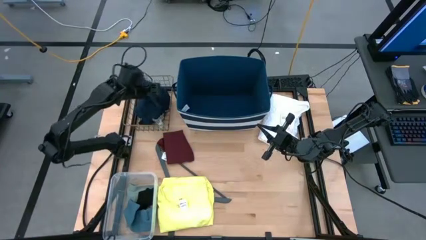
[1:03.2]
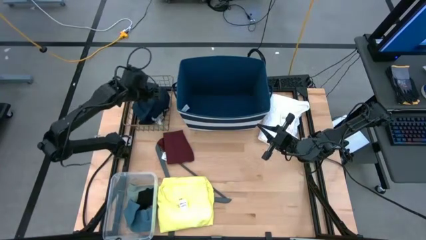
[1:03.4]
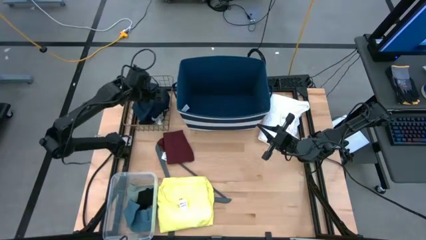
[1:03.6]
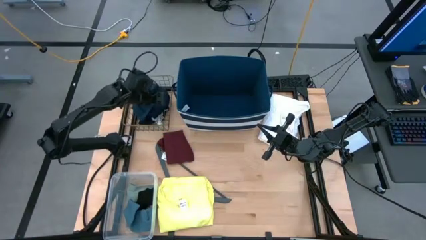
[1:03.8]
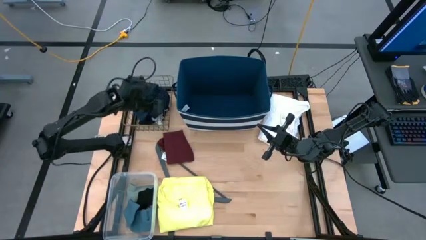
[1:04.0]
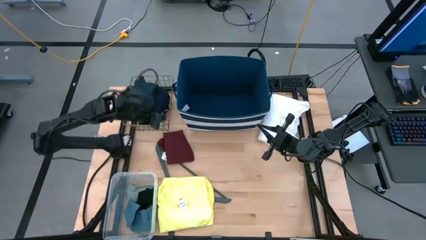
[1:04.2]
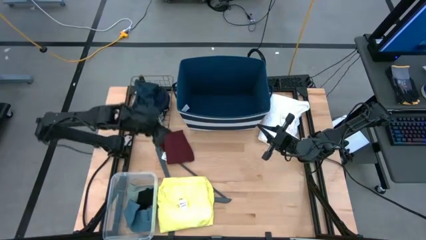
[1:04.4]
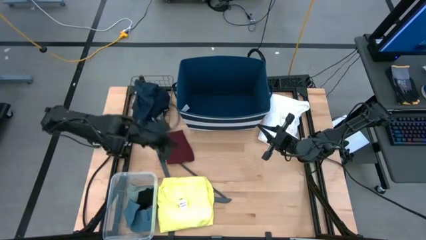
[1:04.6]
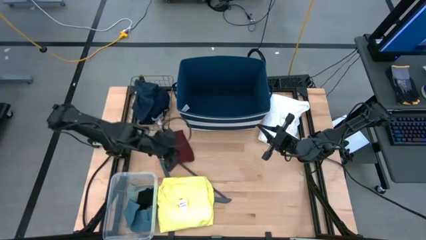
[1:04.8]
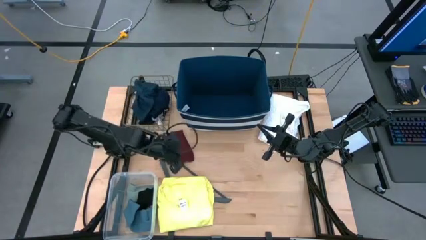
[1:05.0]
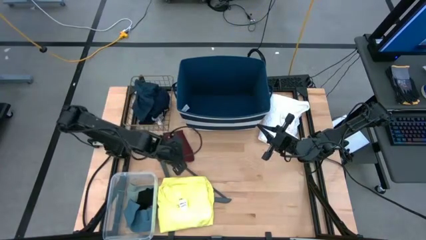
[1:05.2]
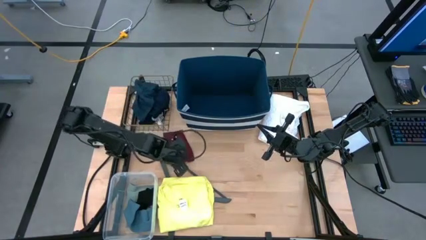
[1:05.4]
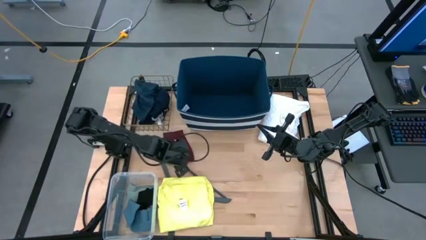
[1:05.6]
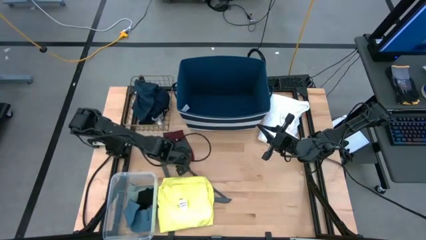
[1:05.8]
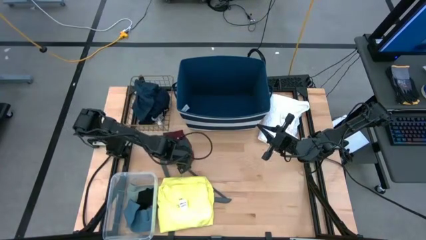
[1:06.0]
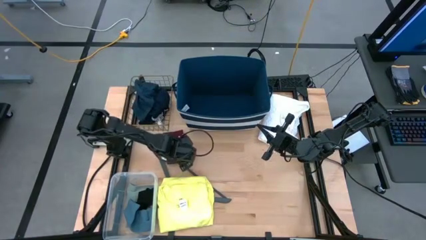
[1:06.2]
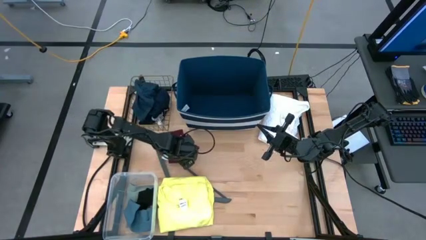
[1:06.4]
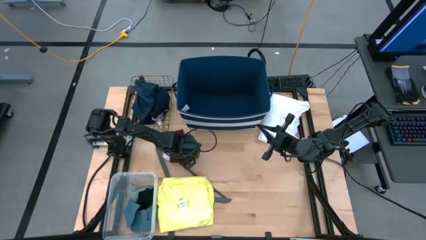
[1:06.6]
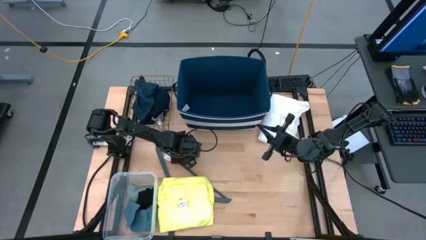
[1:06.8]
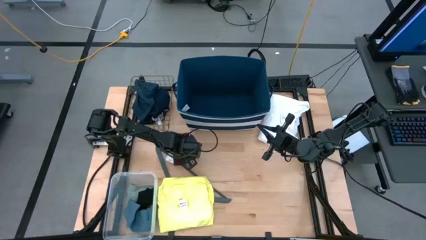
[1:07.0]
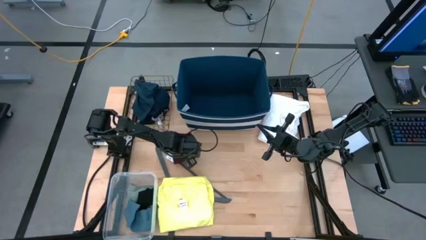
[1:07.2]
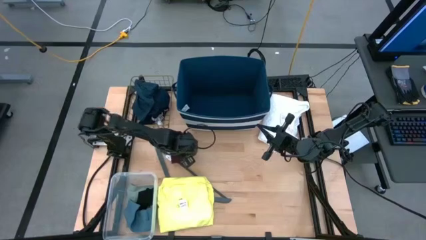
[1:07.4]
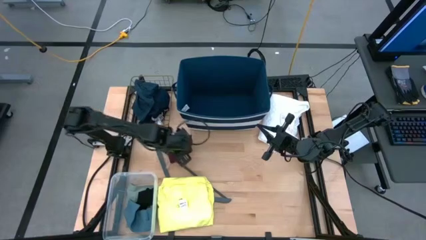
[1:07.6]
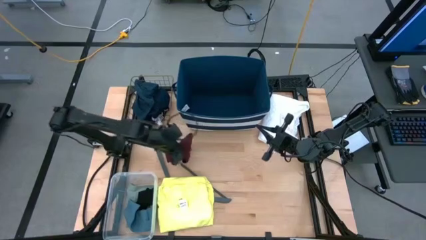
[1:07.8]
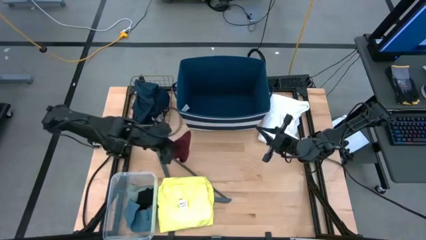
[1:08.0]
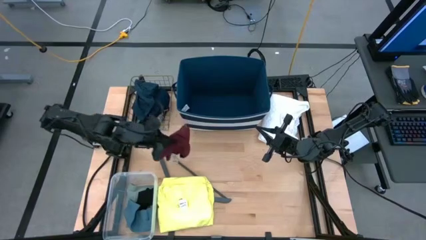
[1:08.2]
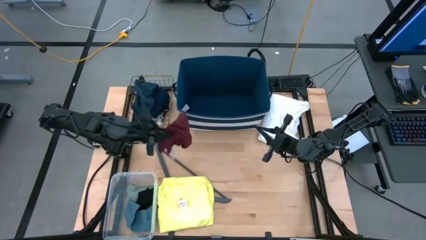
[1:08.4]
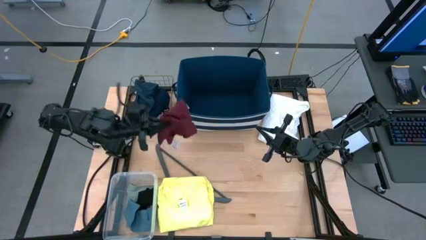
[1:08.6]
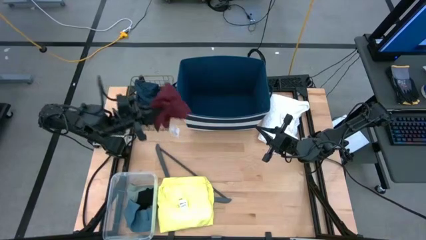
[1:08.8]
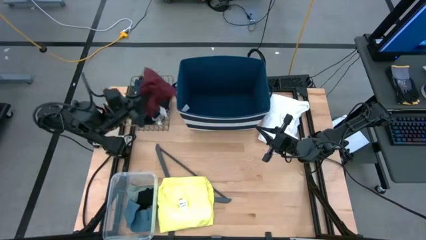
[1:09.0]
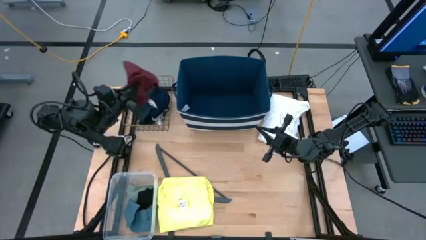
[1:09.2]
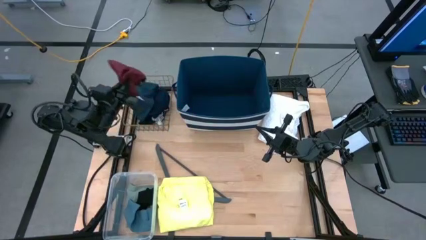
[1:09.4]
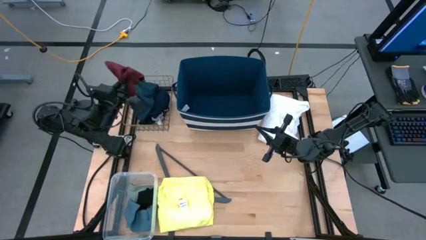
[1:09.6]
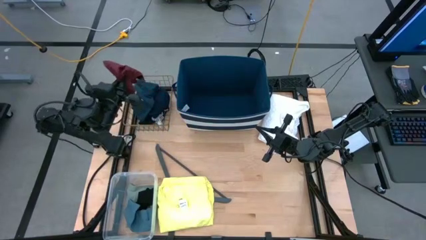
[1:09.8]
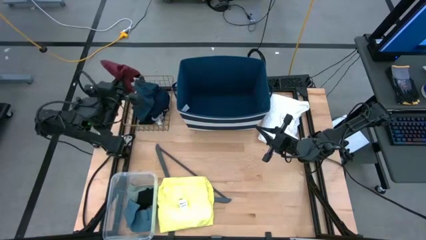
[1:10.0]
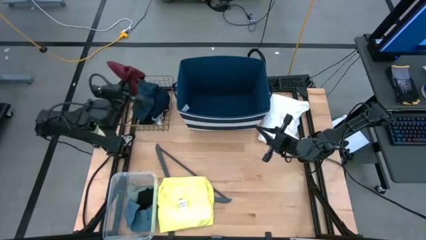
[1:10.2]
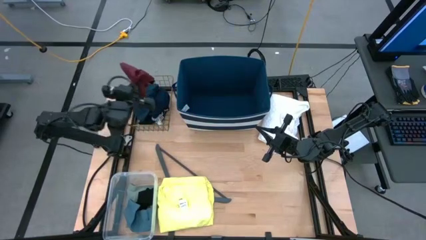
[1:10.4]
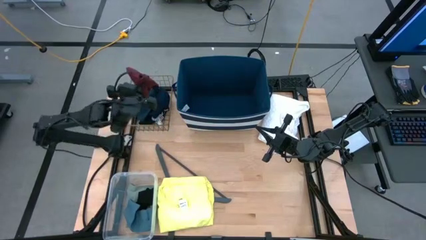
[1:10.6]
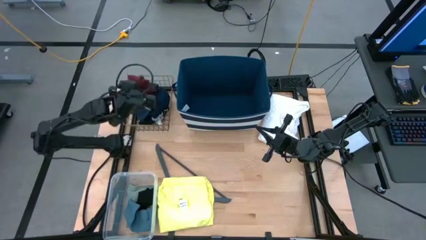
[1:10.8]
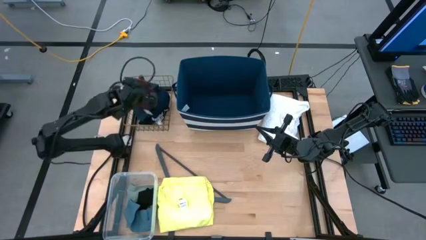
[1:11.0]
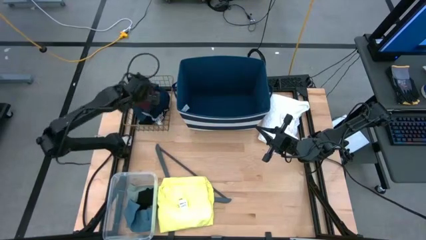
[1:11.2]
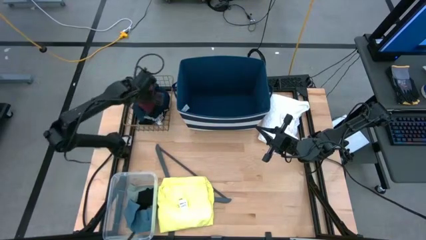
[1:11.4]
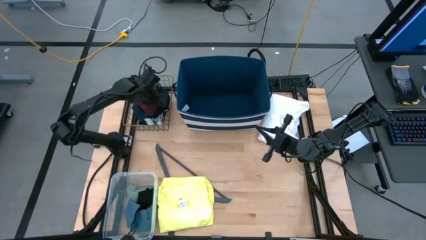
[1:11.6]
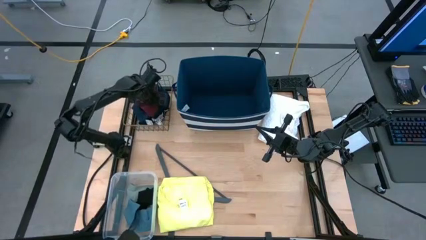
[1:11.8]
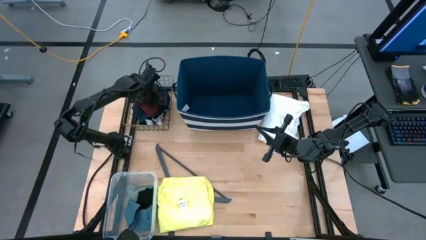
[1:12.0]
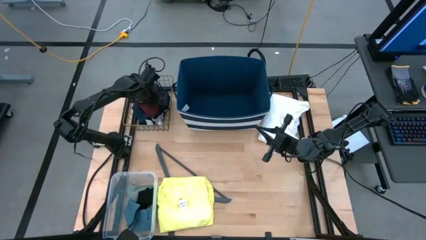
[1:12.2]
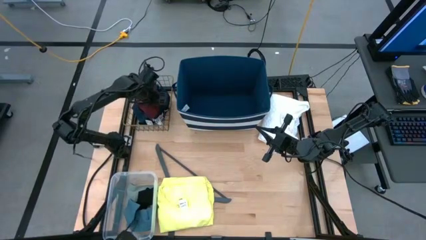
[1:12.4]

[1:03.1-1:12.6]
Task: Pick & Place Cloths
Put the red shorts into the wire basket

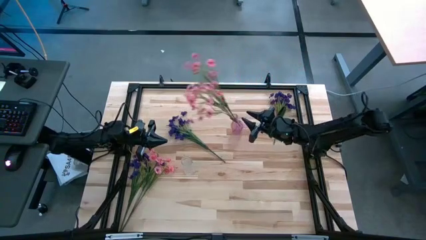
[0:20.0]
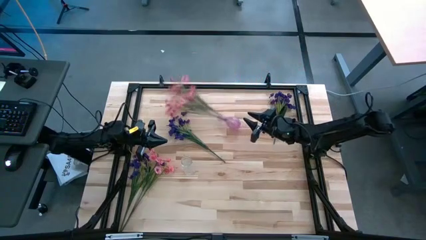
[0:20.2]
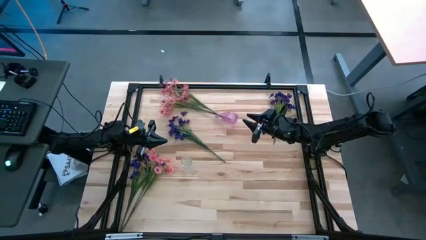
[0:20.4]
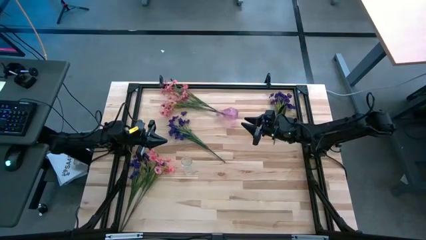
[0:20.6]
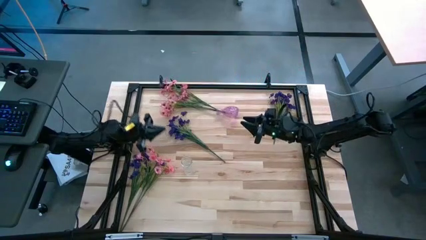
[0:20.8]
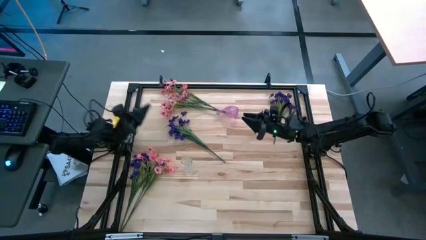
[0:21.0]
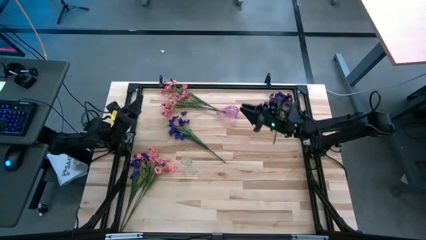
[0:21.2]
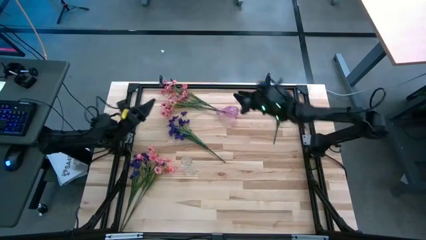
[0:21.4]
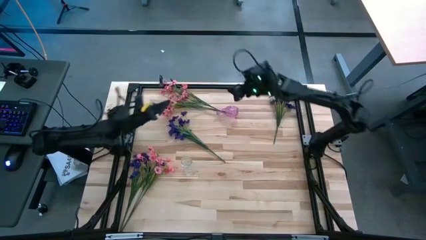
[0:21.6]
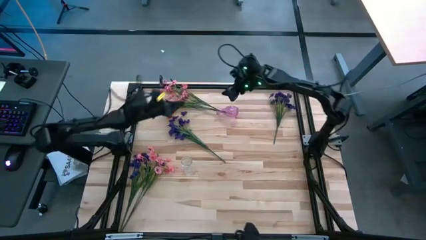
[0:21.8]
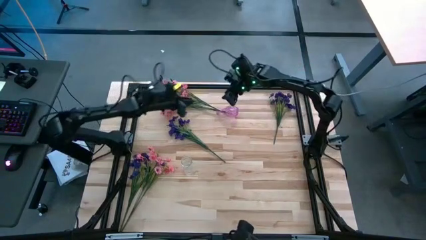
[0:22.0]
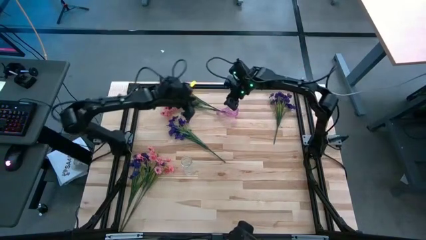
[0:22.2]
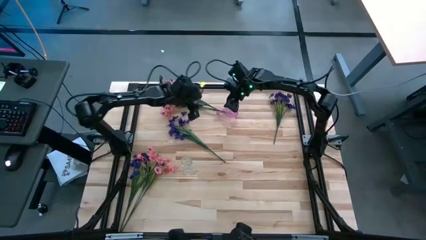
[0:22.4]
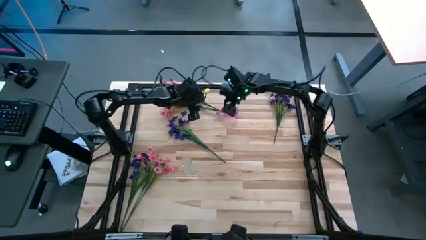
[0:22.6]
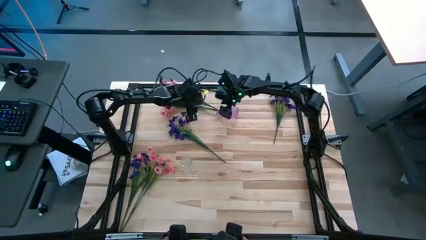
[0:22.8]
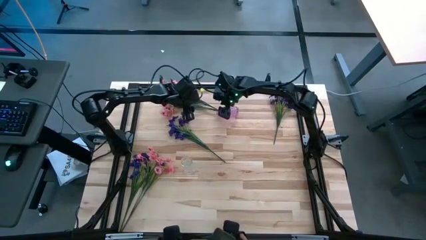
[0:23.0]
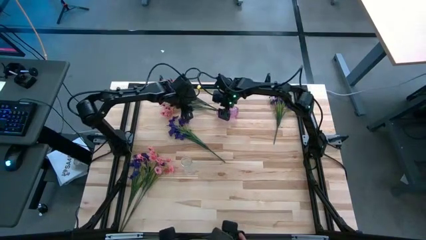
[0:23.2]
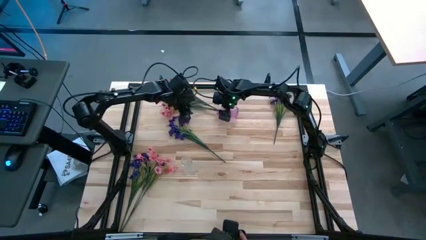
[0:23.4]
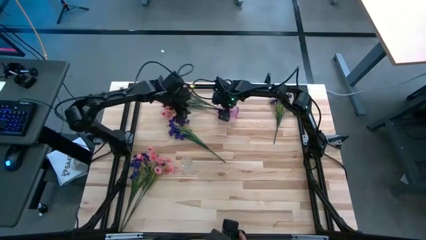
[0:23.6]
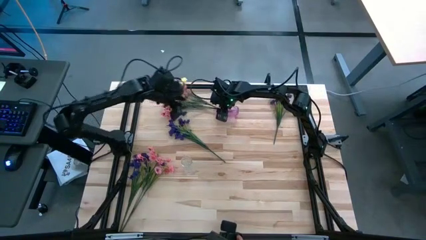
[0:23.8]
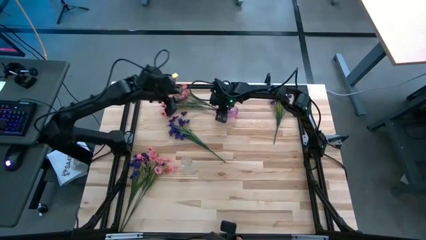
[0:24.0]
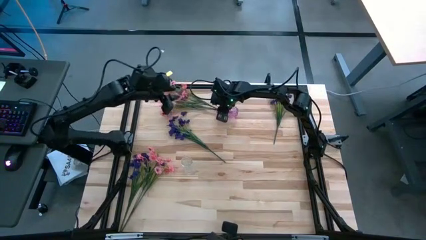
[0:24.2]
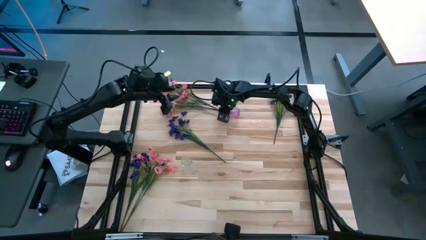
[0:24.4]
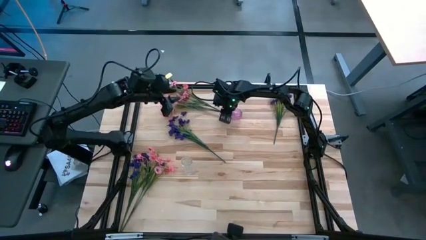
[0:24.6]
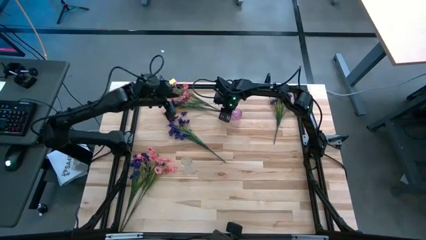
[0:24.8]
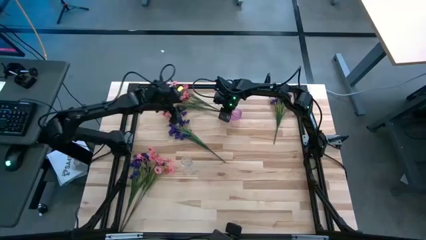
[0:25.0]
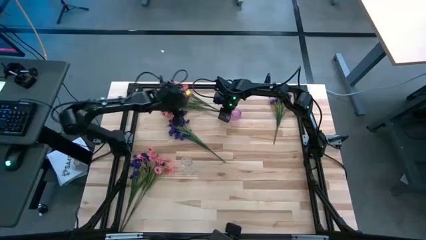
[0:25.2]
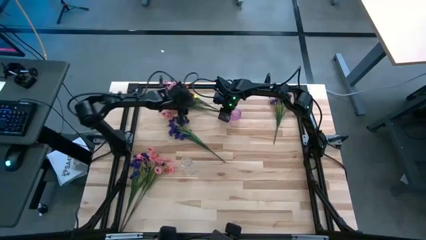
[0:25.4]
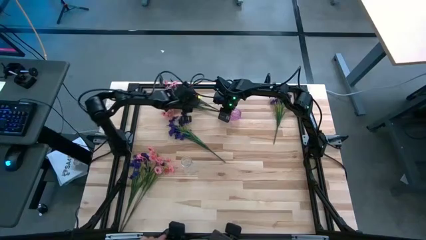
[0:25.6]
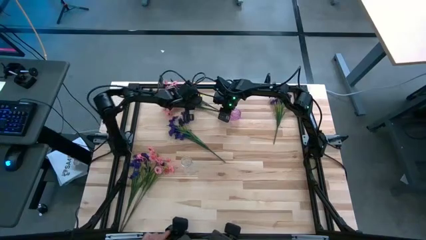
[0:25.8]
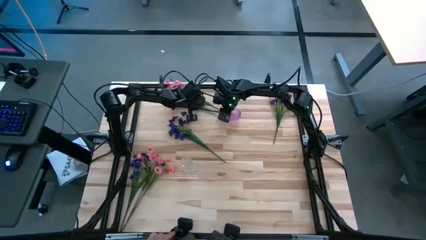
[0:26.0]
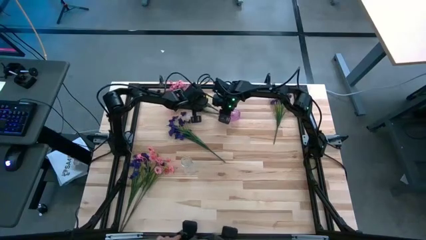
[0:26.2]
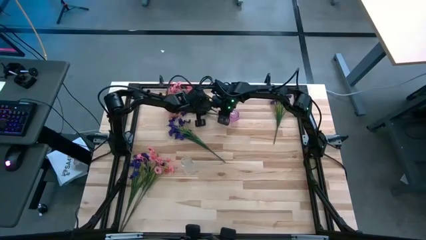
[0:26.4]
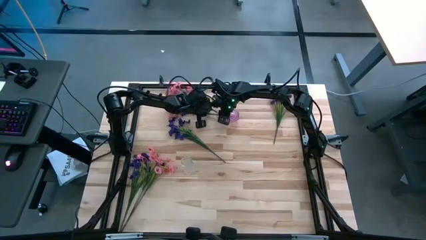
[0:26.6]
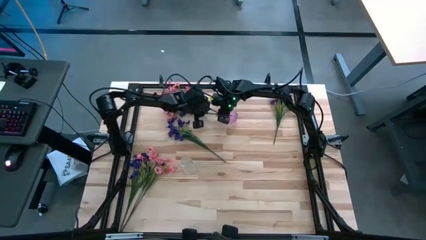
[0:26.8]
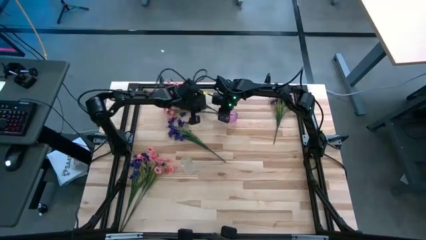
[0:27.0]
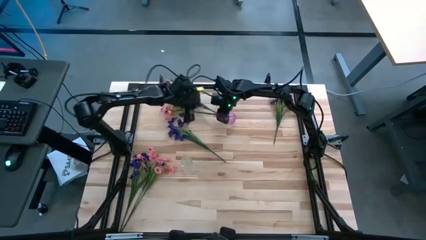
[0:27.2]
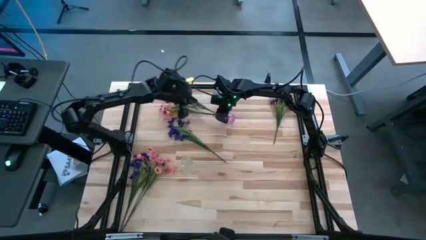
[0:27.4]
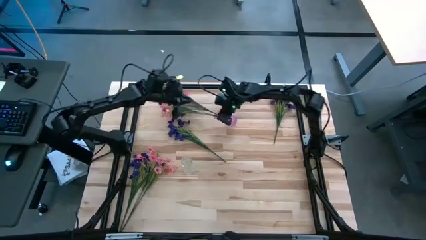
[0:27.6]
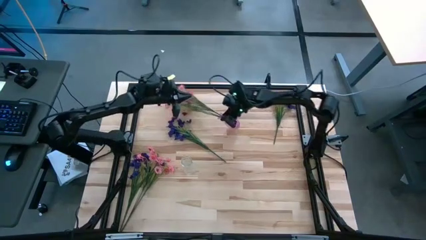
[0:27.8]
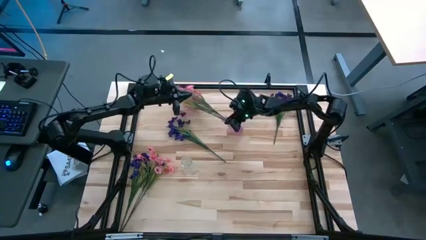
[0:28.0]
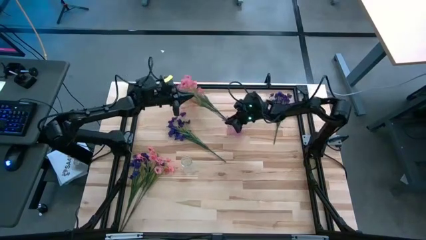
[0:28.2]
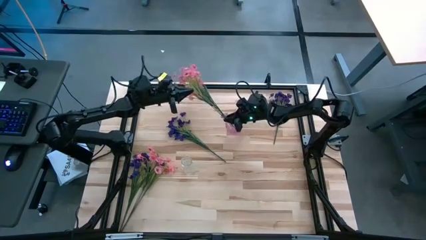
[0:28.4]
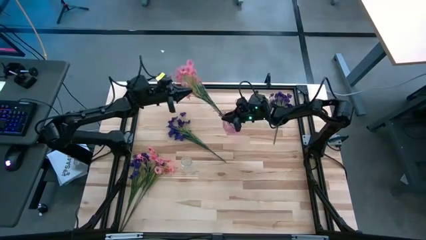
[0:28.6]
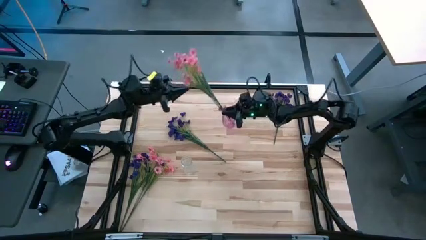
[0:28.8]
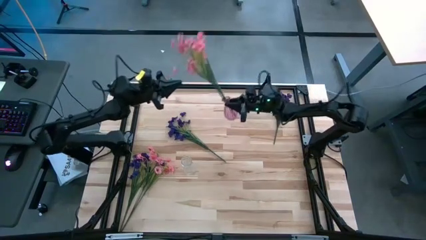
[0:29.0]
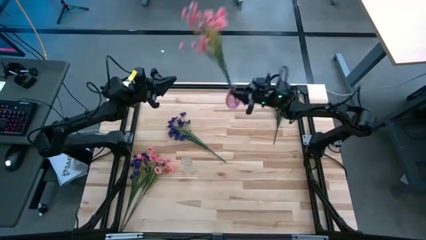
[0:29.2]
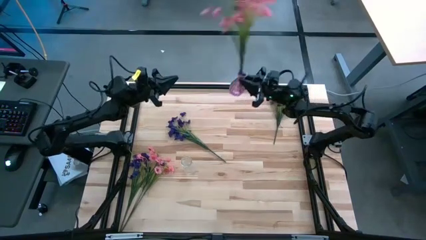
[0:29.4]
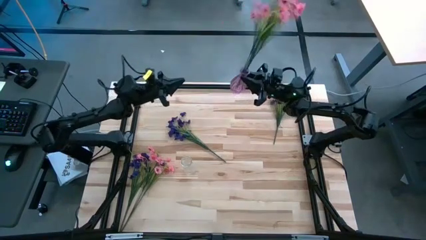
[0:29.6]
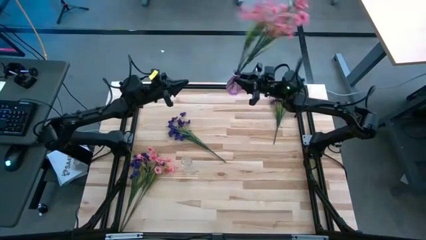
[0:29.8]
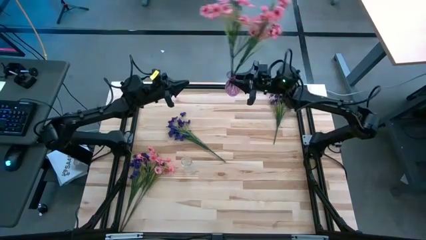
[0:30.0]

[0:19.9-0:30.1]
Task: Sort flowers into vase by color
Adjust the purple vase on the table
